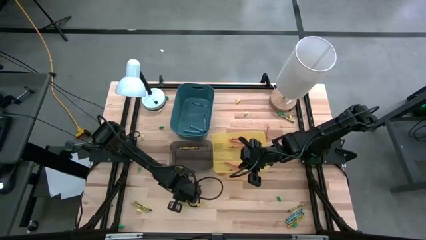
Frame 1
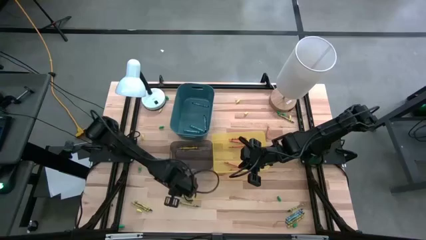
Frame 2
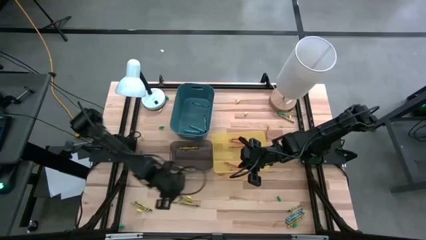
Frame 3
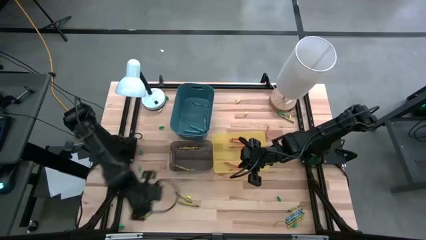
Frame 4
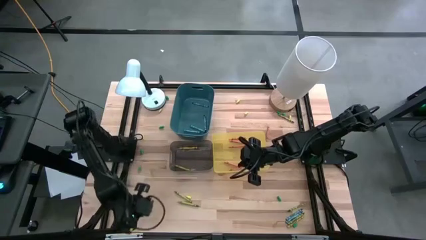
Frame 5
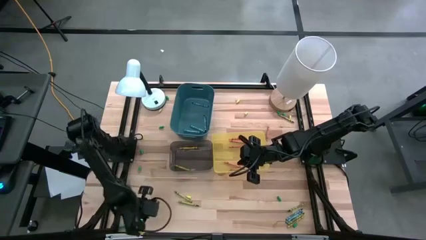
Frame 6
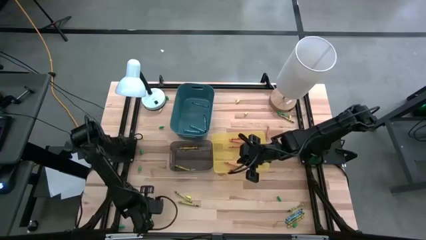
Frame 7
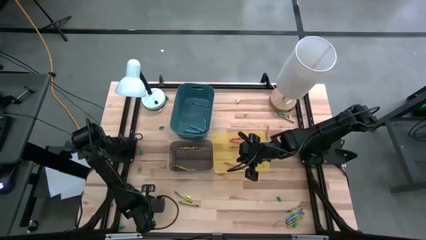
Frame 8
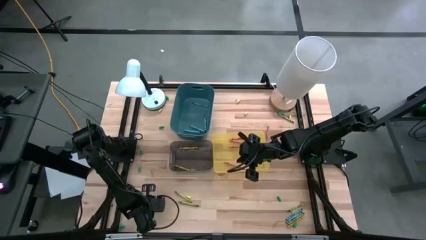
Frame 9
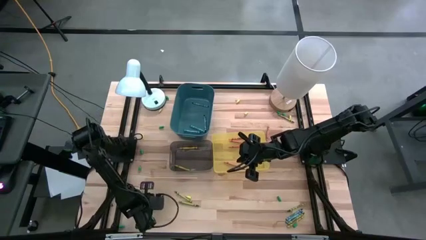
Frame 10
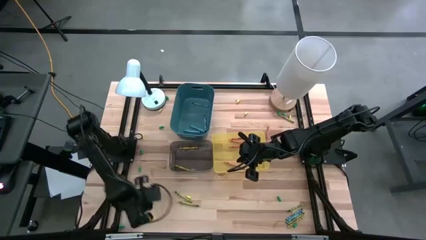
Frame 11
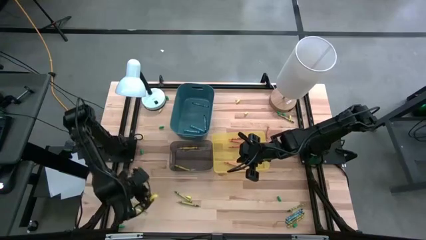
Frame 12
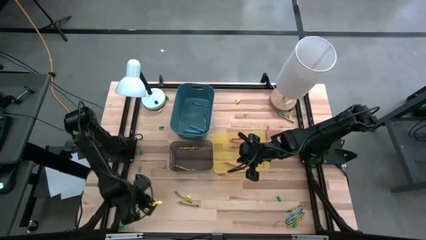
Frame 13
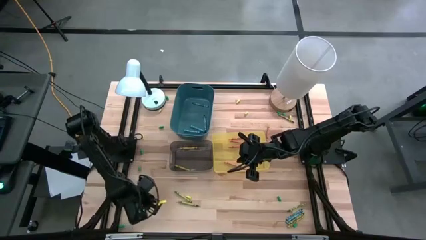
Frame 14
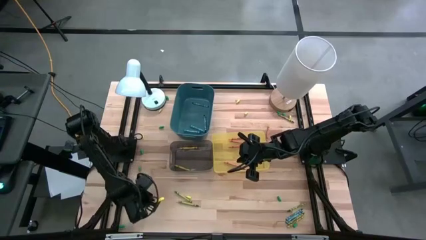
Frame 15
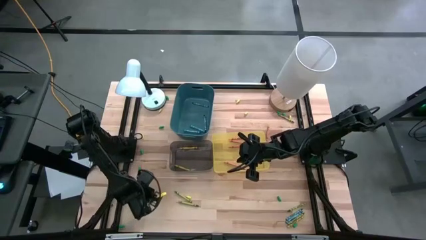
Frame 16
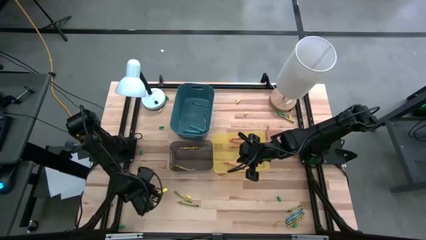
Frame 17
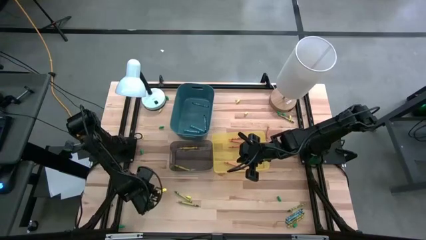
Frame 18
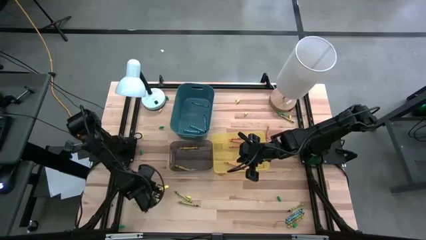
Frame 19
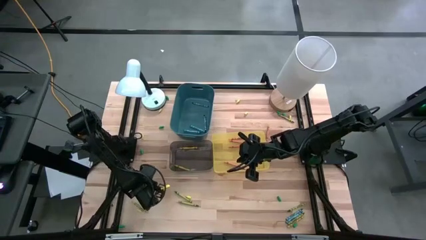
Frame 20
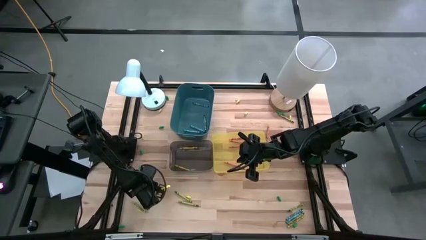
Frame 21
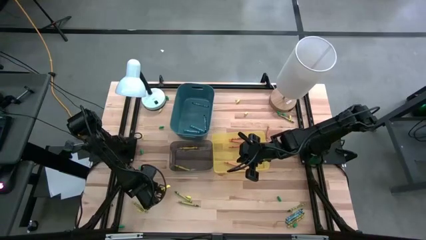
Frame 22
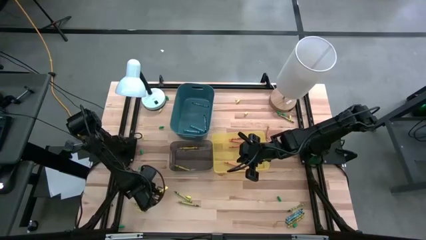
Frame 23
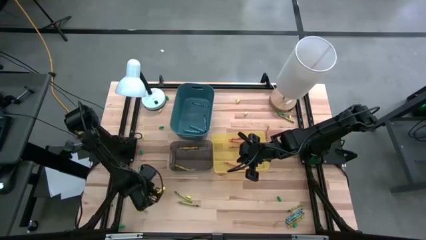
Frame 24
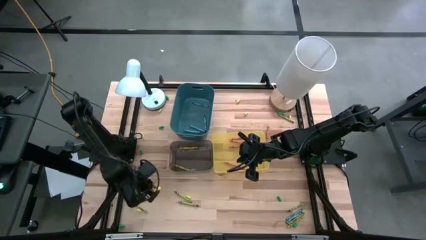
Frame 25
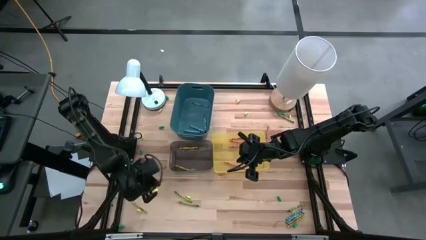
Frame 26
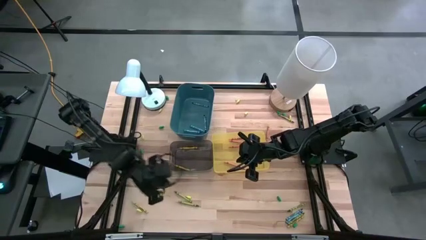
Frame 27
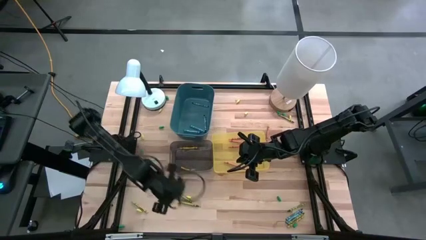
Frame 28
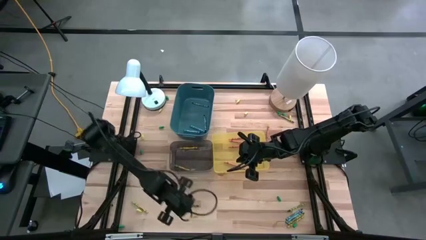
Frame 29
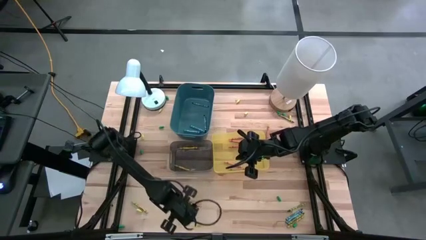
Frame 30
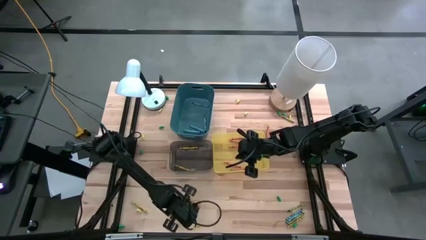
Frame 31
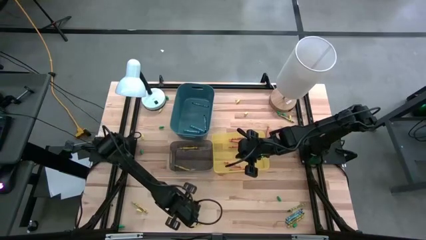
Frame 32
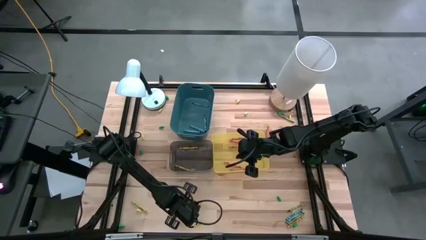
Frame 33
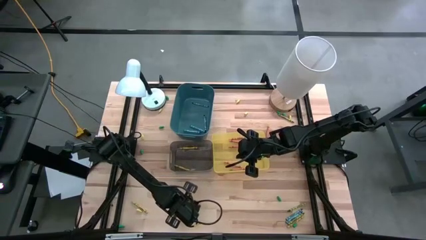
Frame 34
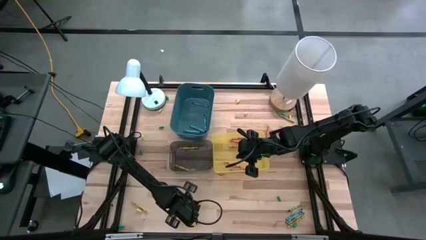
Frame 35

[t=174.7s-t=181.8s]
Task: Sort crayons
Move the green crayon to the bottom left of the table

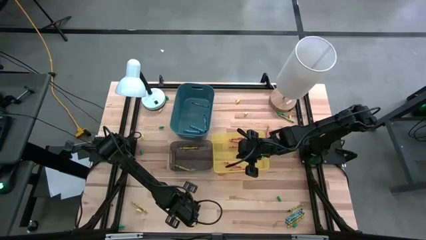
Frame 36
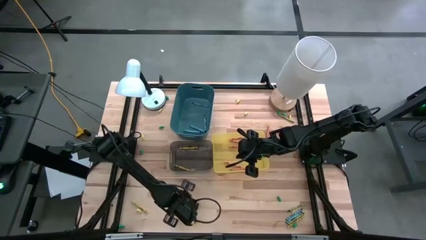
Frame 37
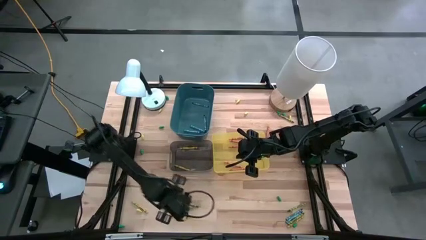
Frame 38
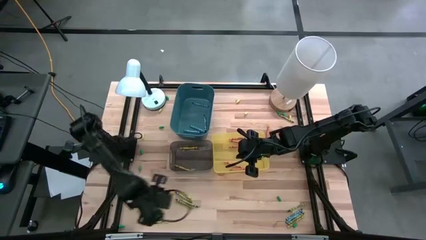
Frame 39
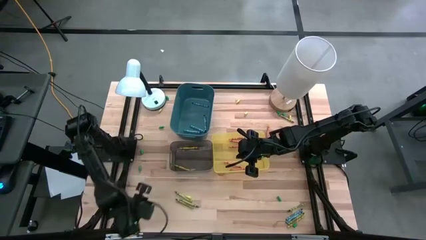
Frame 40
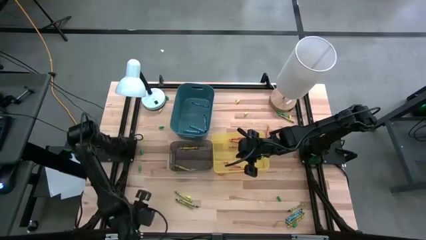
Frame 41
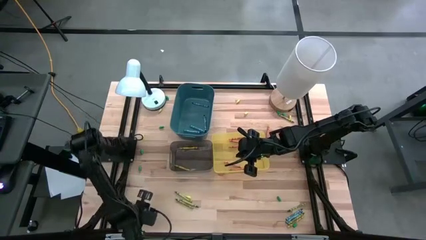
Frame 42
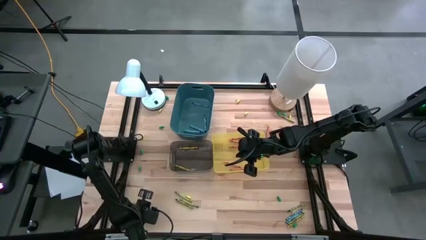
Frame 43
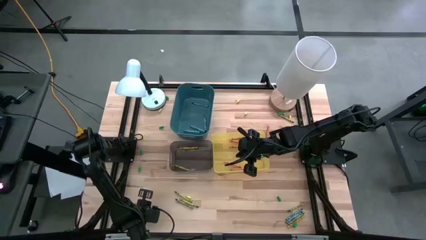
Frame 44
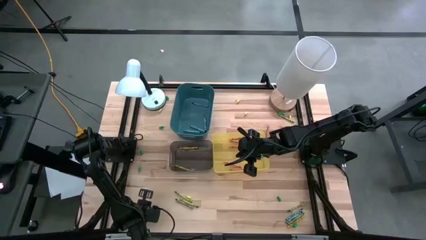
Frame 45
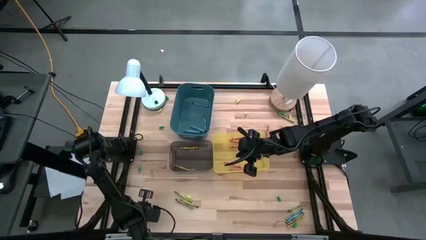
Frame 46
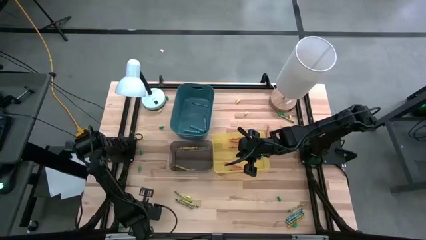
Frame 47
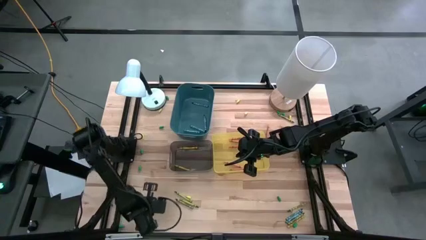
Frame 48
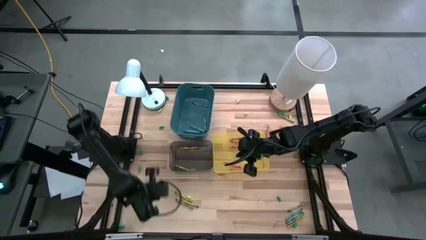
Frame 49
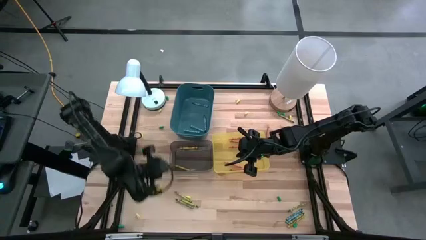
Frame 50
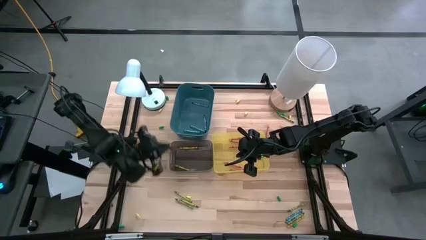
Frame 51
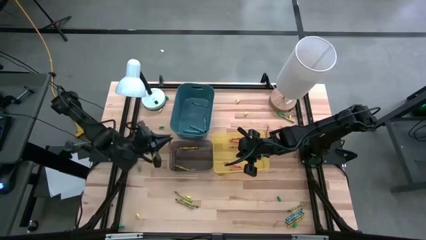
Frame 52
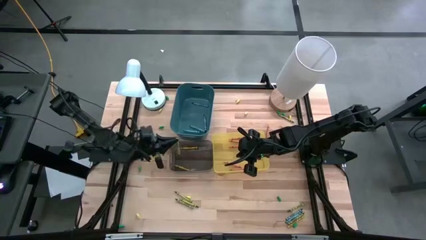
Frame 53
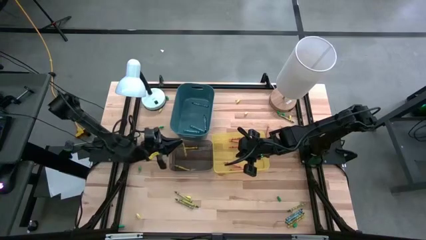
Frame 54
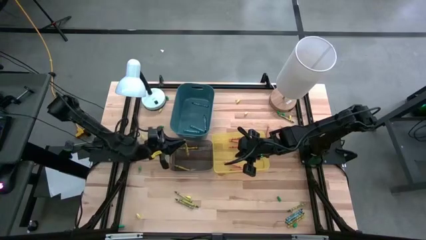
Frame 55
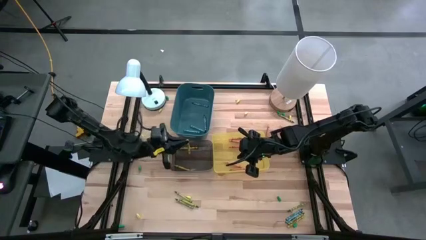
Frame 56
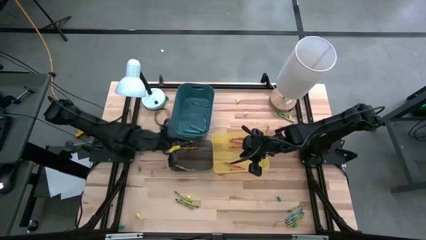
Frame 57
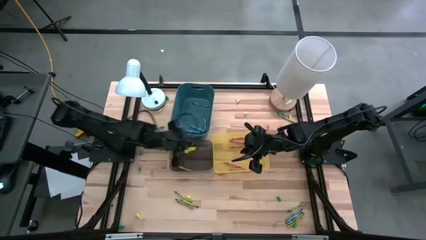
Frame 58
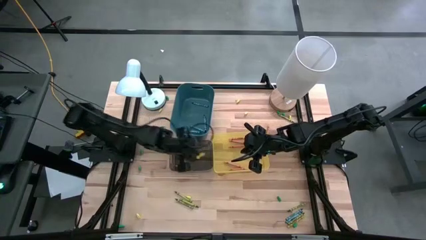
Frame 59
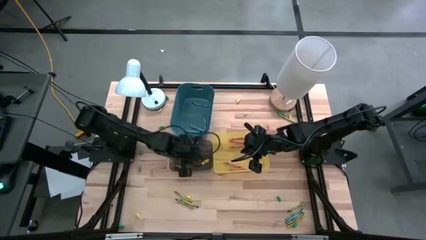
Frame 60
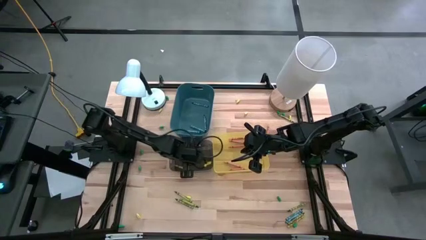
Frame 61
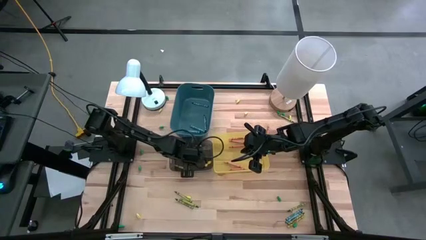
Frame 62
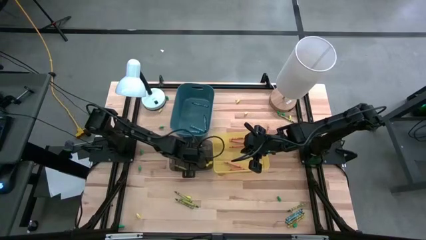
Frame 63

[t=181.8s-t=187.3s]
Put the light green crayon into the black bin

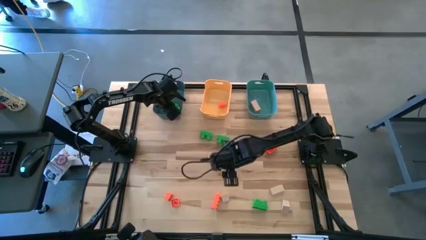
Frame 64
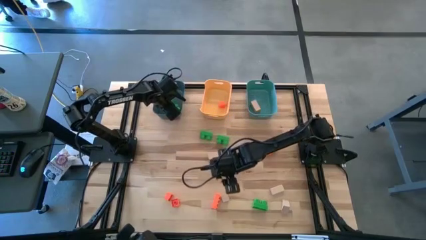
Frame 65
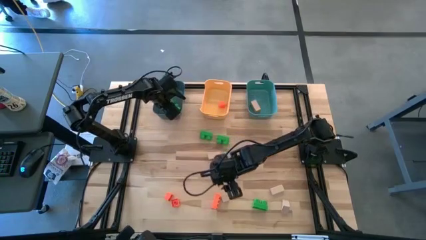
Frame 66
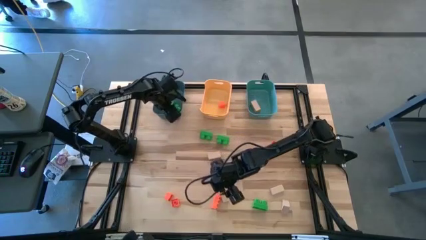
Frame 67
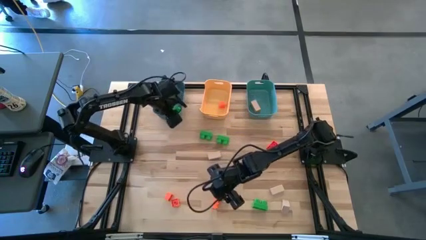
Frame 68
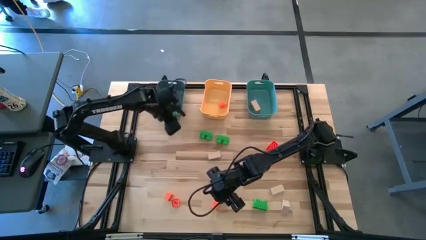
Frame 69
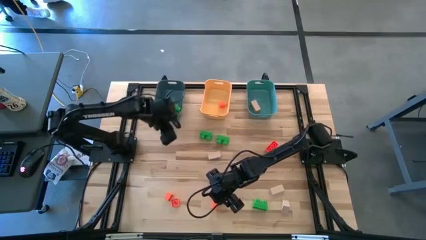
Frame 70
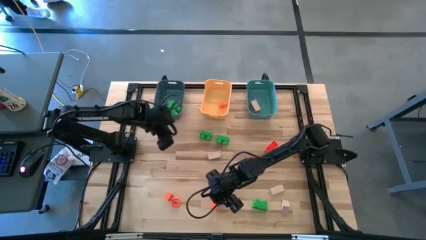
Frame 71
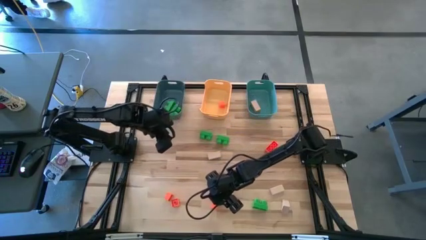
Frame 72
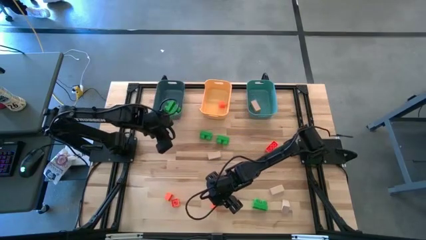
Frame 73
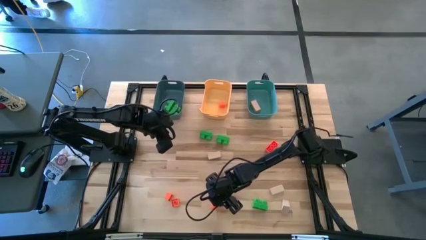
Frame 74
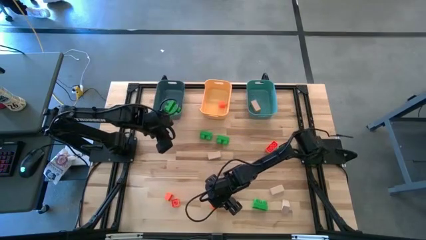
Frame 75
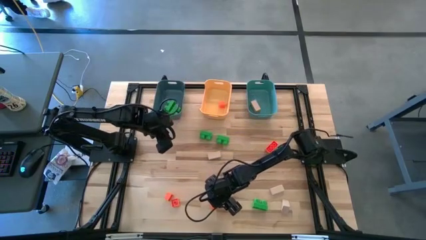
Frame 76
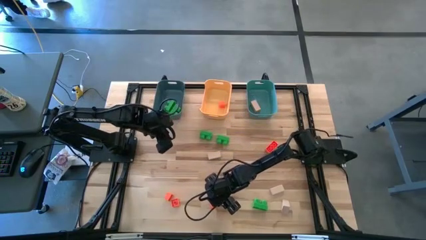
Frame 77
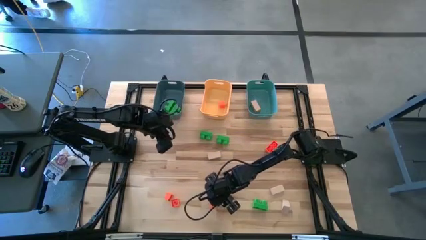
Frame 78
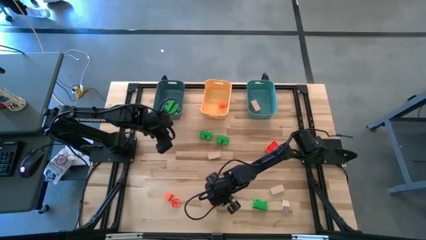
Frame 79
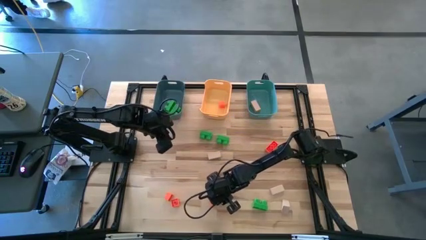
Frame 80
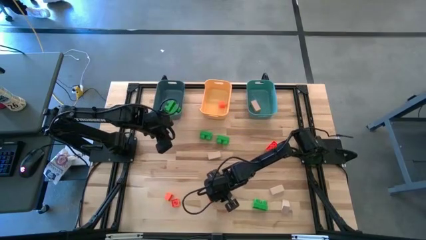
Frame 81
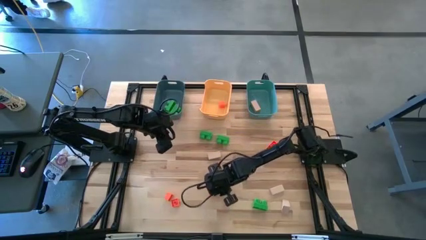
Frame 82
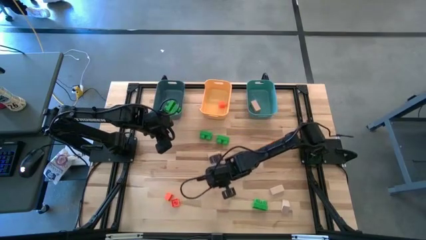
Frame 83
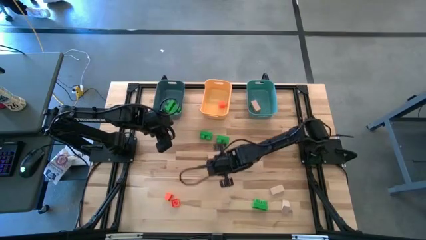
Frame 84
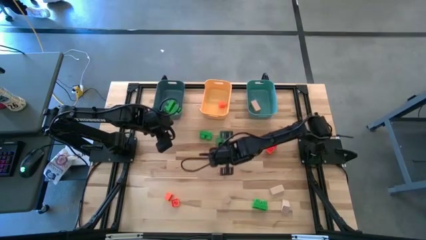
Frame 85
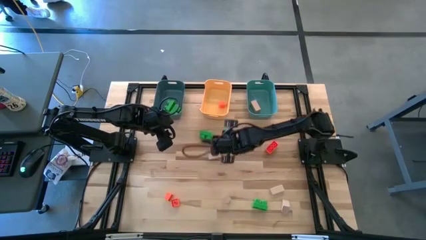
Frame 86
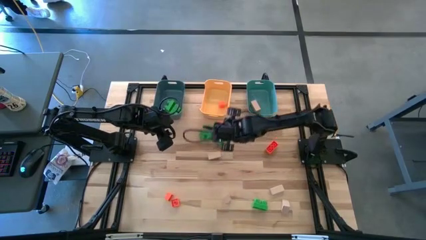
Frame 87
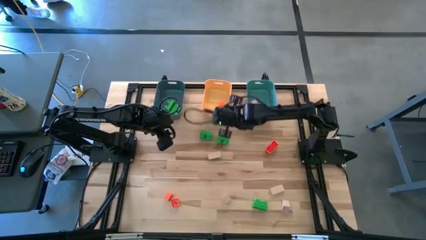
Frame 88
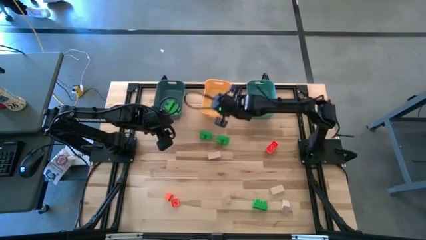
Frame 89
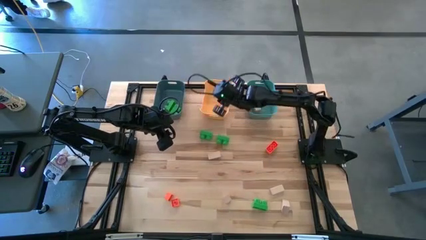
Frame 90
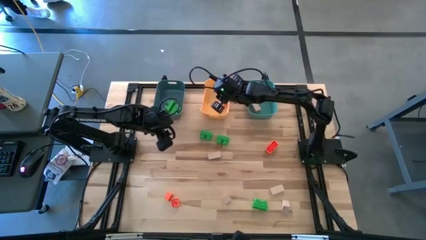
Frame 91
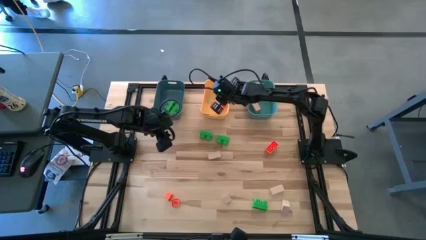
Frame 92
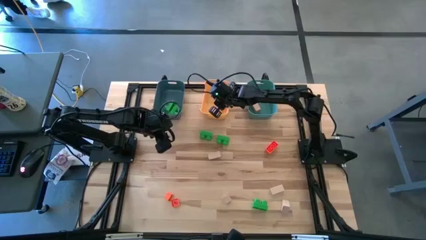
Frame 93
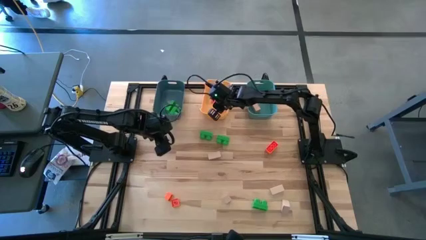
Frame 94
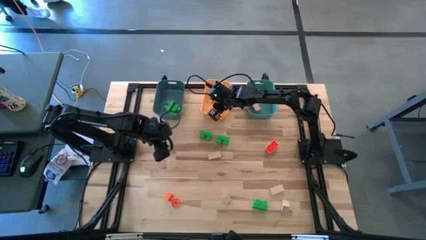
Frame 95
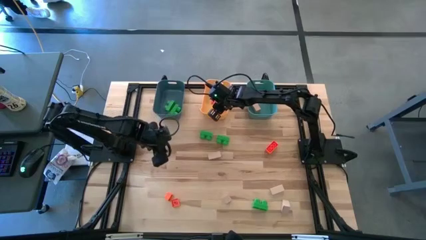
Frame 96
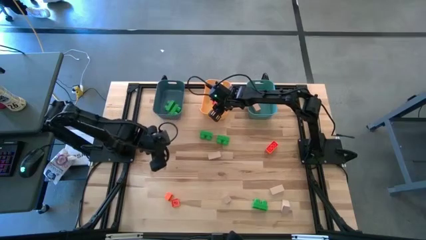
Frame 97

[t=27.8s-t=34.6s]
Task: Sort & place blocks by color
Put the orange game piece into the yellow bin
